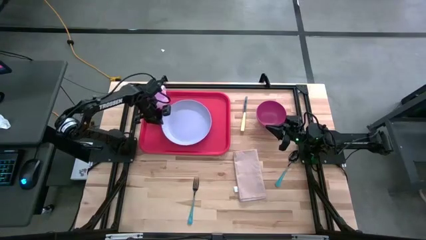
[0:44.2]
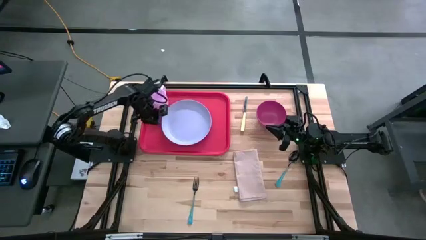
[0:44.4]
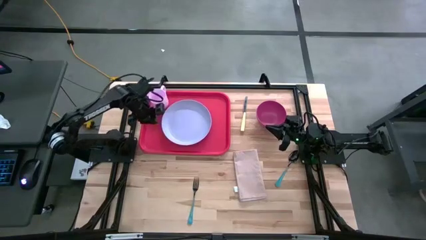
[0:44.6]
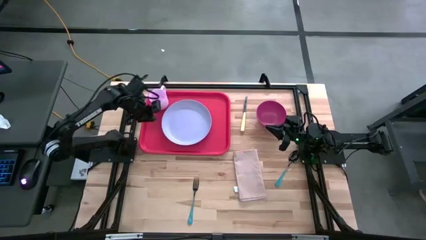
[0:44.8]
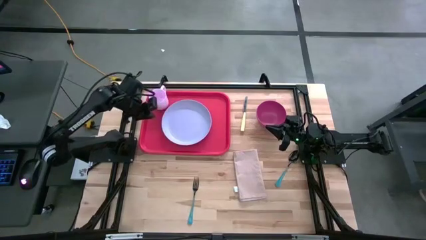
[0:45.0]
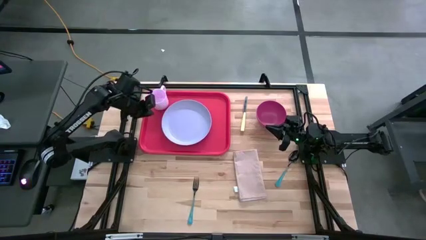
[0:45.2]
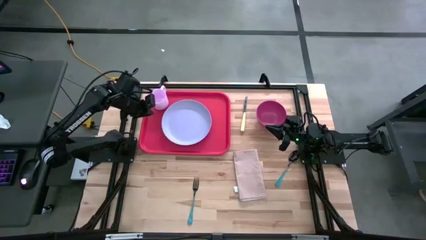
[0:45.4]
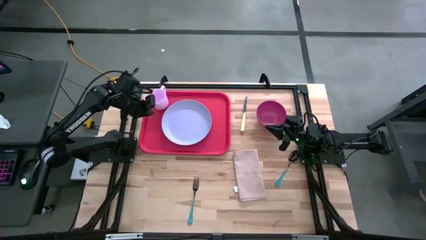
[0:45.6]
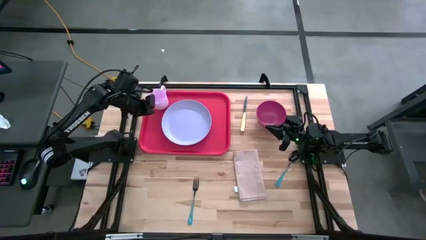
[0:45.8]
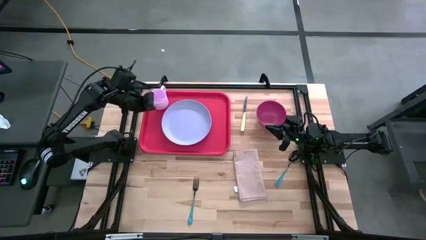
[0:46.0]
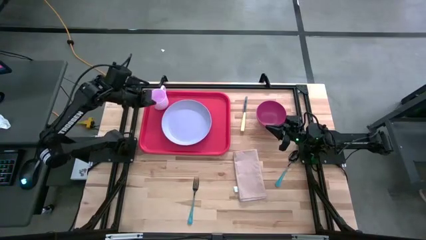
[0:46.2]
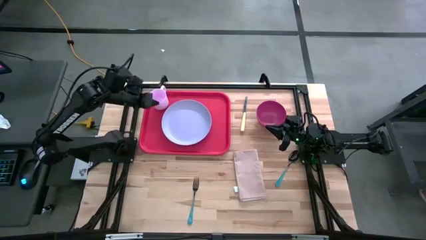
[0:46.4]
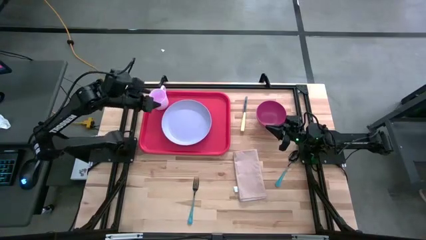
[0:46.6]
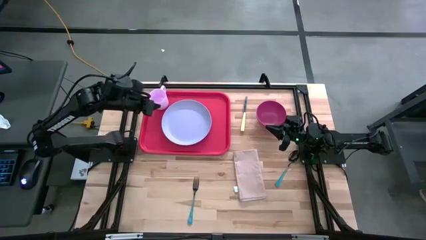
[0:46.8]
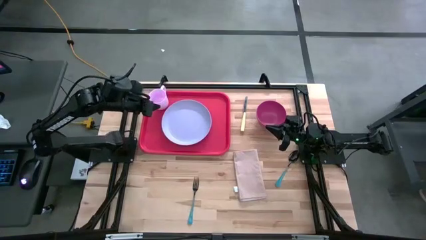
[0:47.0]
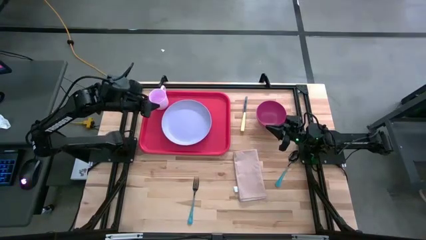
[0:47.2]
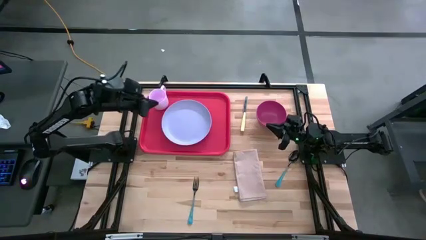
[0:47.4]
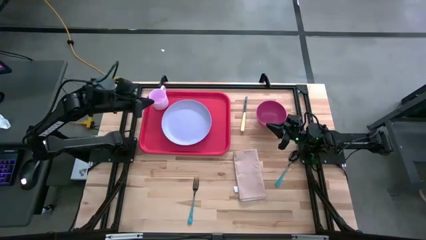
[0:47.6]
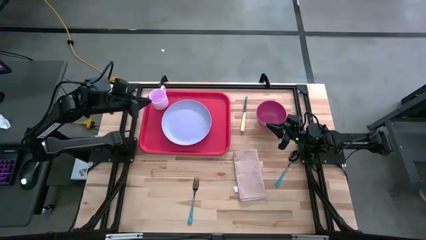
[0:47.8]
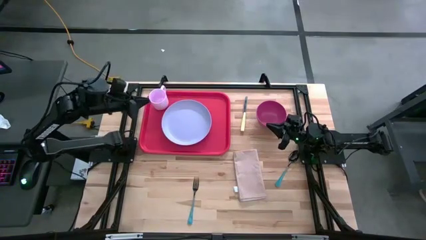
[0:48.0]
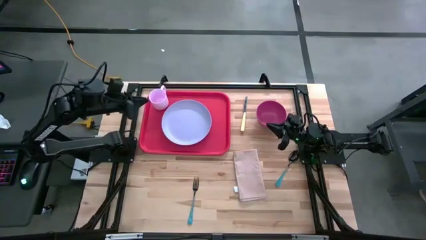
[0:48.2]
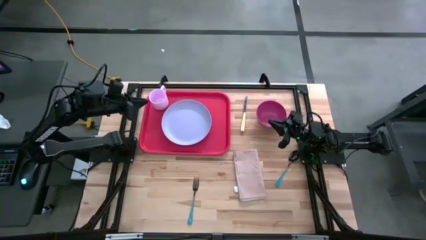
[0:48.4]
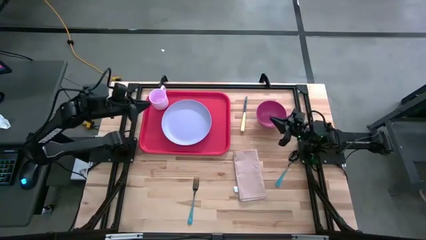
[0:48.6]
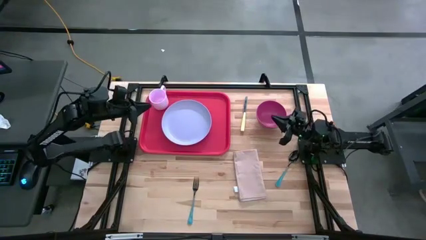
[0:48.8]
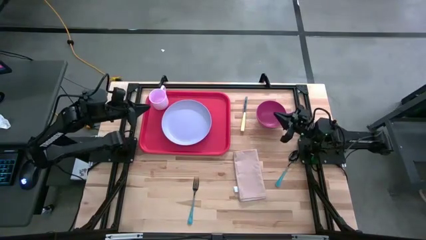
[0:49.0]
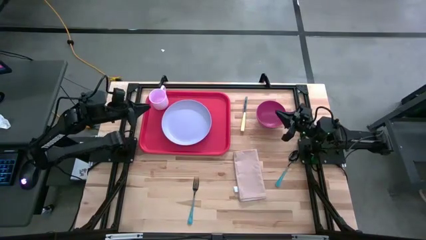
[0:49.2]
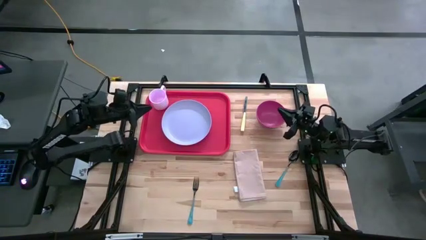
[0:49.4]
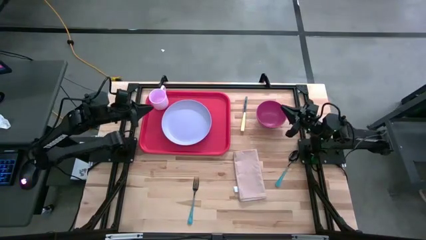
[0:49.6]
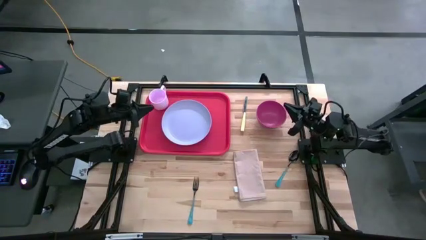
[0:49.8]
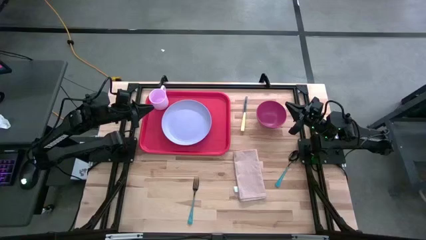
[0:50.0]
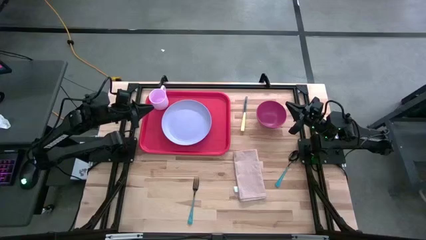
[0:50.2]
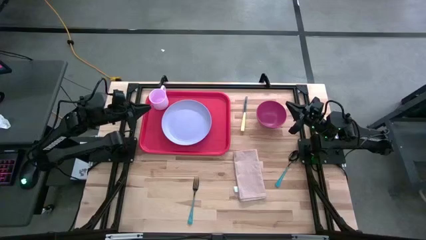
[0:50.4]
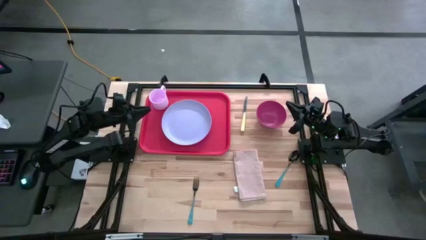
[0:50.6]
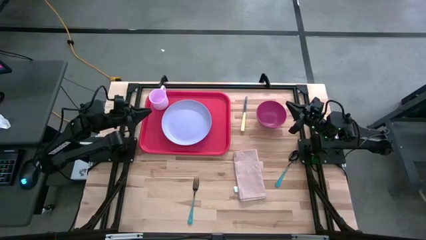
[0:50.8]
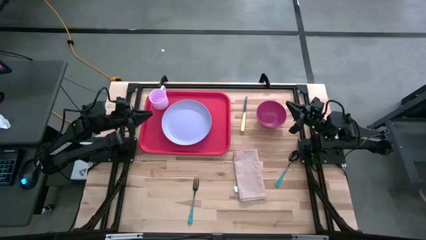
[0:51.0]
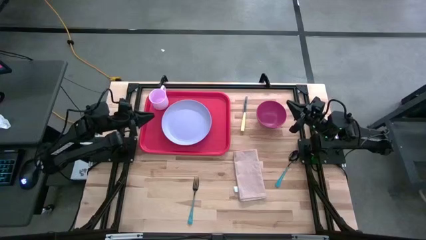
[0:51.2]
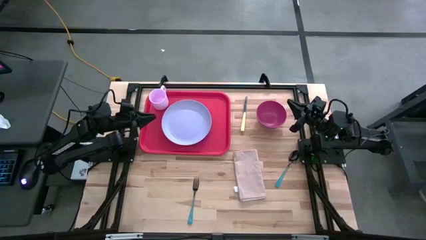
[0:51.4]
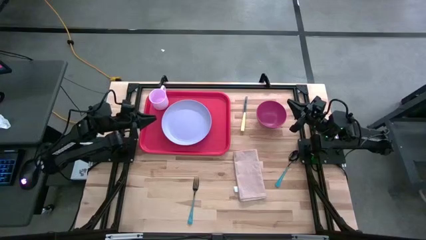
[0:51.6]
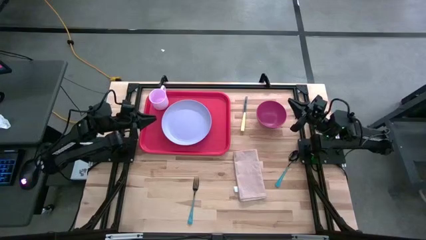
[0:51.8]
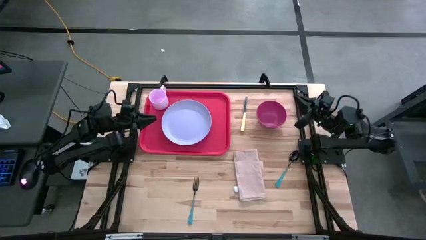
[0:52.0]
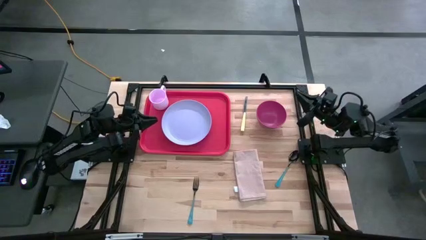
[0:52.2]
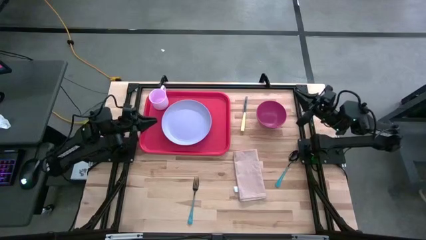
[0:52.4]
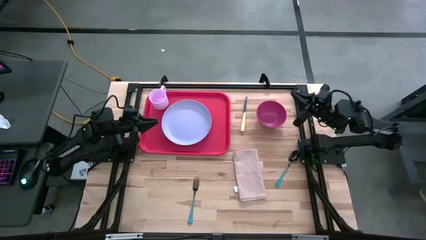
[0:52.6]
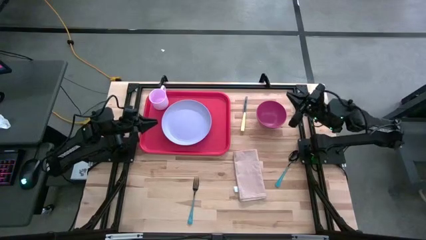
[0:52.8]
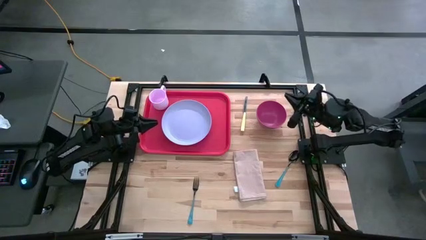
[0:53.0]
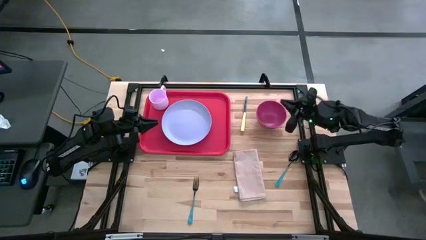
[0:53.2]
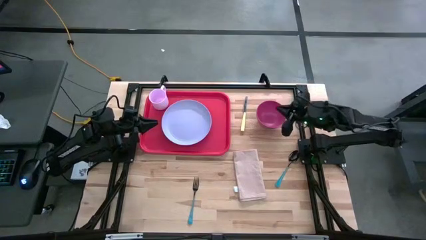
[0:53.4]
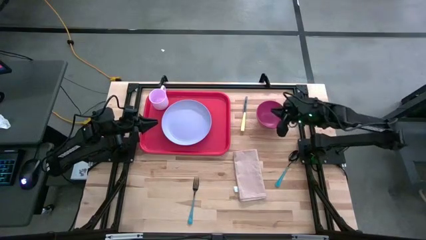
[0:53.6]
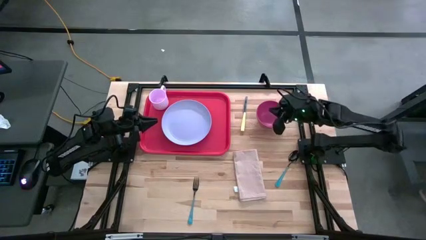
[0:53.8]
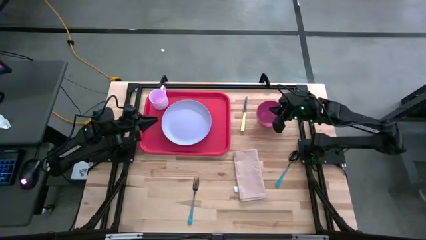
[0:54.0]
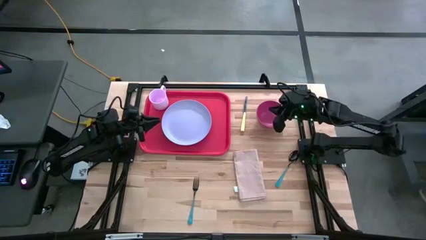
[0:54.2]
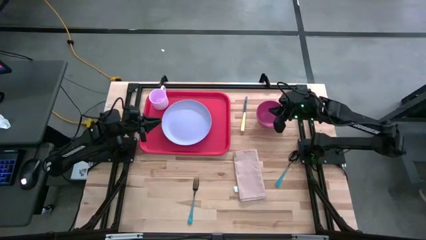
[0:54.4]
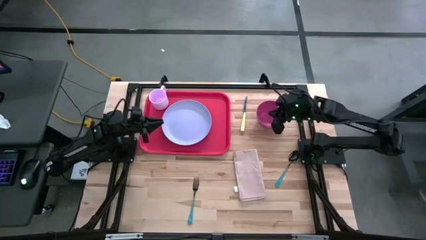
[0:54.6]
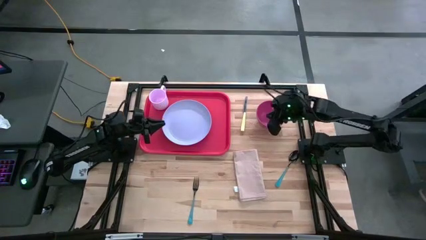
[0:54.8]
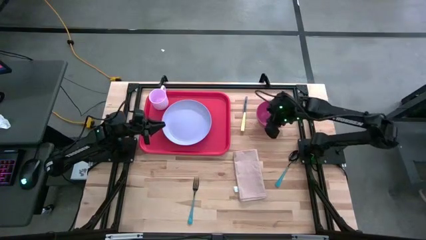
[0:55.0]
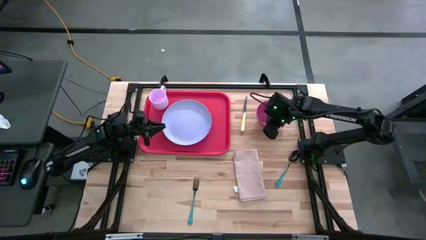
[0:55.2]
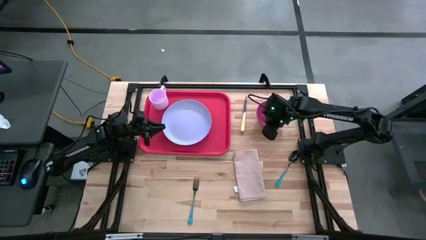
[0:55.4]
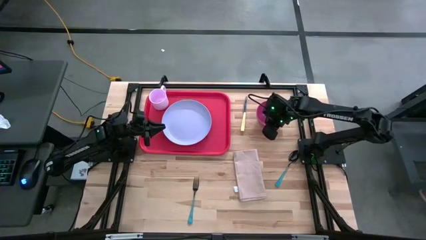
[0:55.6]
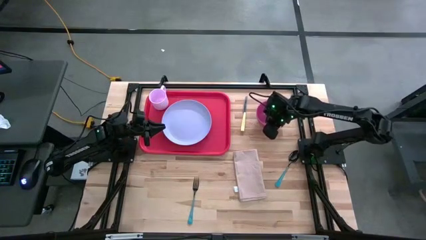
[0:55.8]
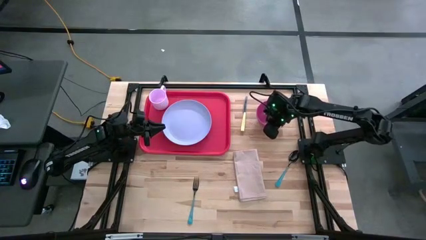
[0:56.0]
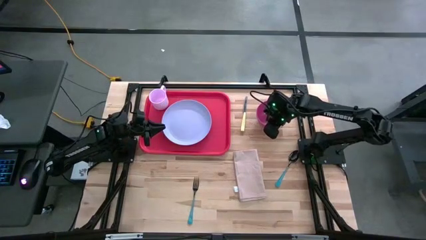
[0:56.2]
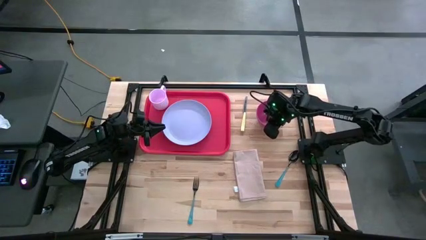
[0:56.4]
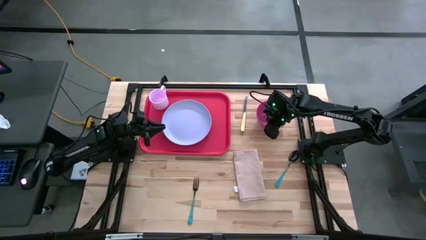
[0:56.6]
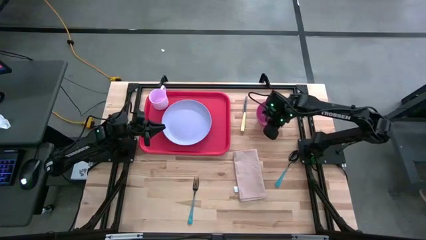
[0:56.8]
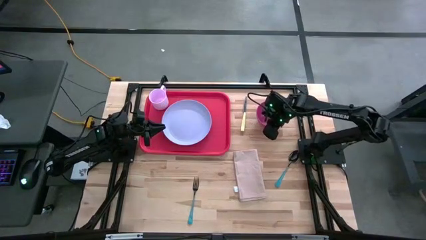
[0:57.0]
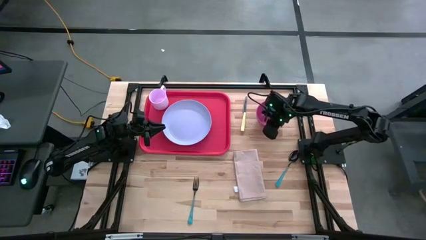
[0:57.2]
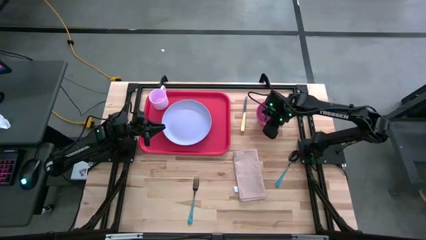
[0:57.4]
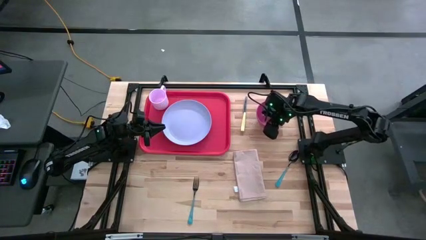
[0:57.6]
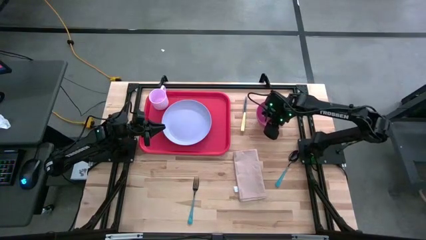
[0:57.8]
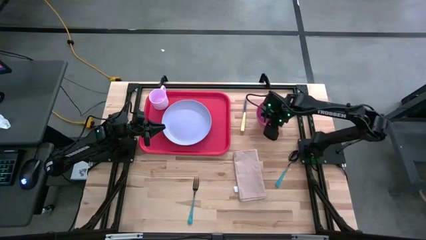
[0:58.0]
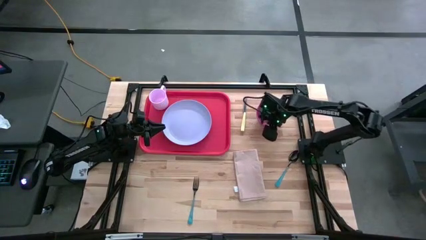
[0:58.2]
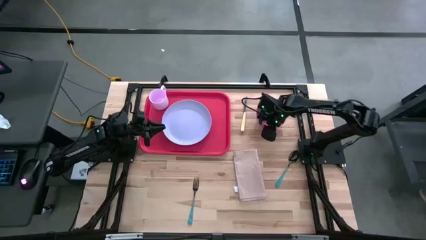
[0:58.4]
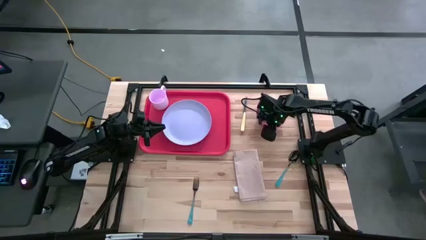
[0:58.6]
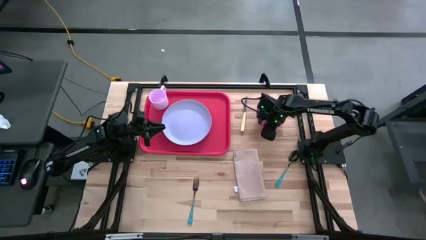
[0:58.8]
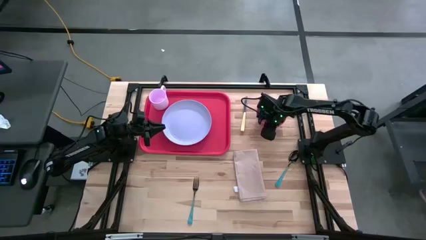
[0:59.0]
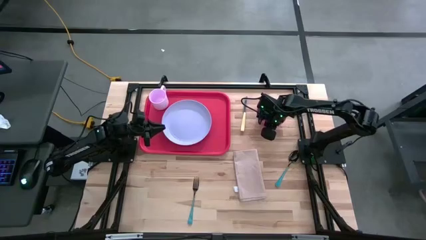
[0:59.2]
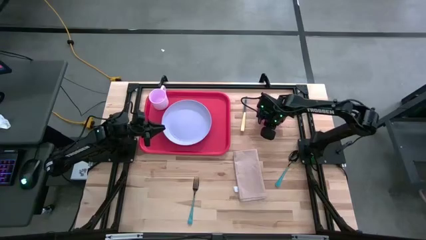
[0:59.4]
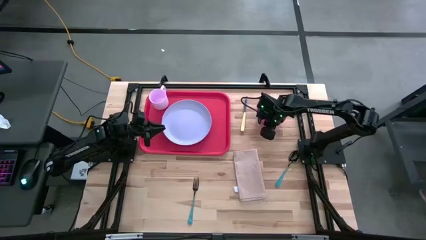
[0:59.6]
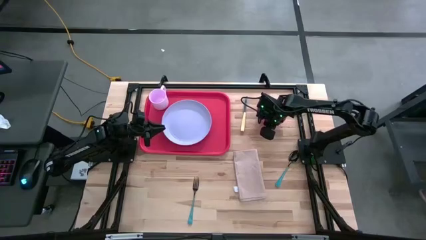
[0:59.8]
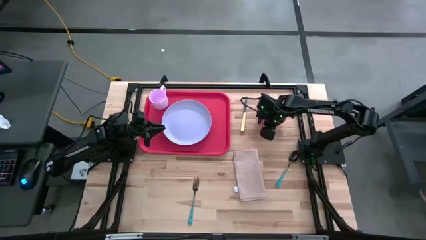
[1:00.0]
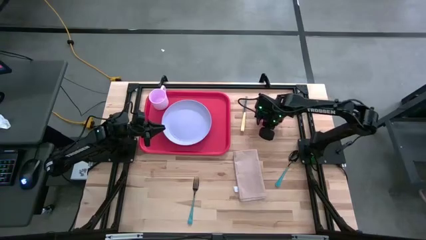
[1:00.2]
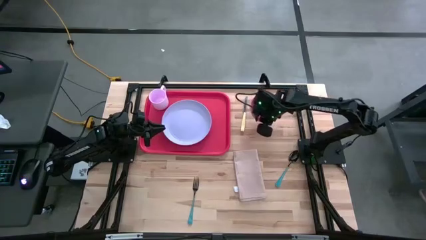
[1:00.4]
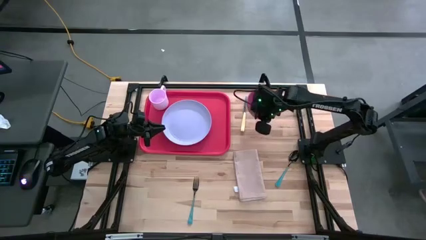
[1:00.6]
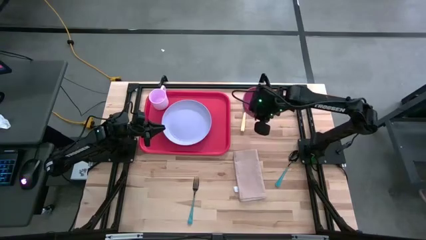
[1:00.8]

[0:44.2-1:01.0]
Task: Set up tray
Put the pink bowl on the purple plate
